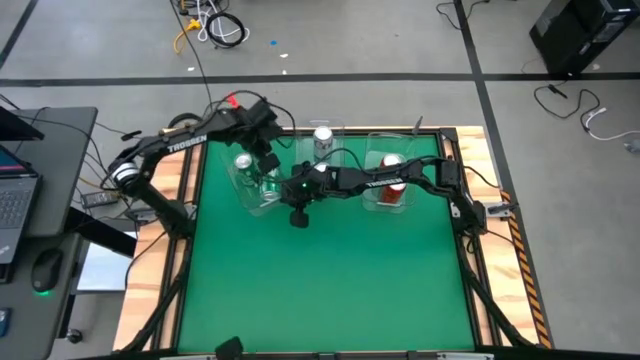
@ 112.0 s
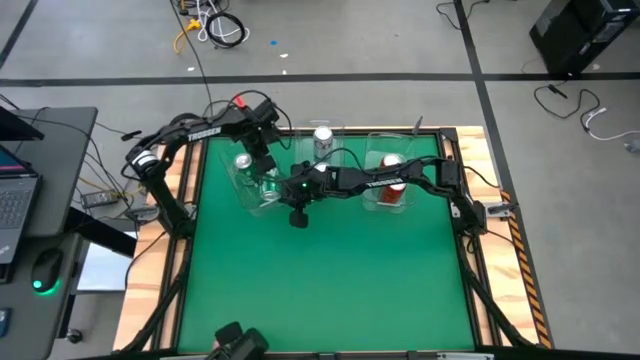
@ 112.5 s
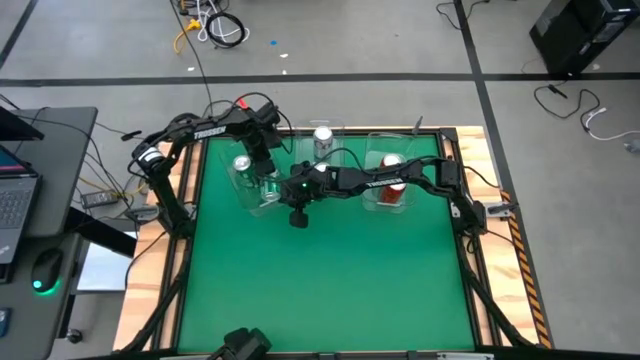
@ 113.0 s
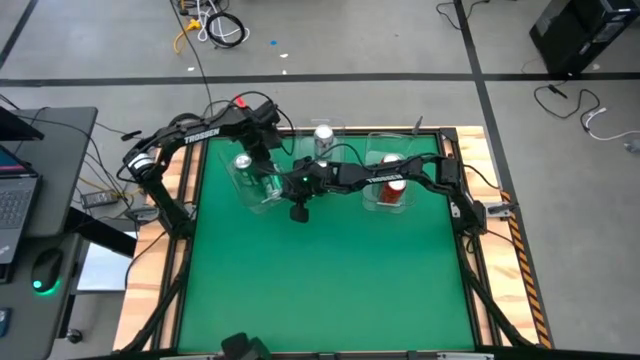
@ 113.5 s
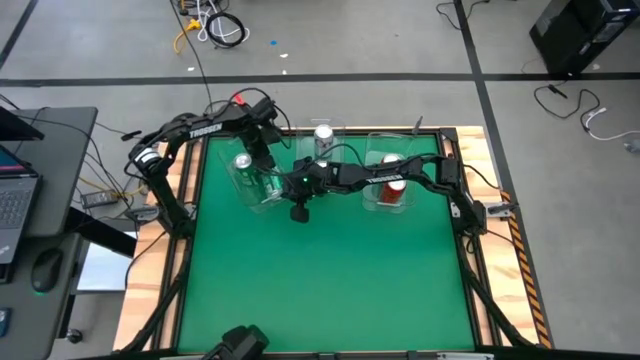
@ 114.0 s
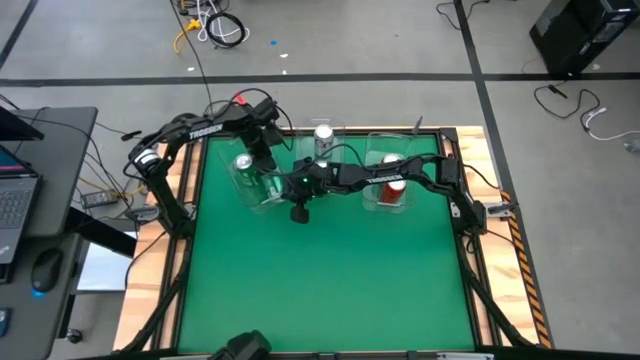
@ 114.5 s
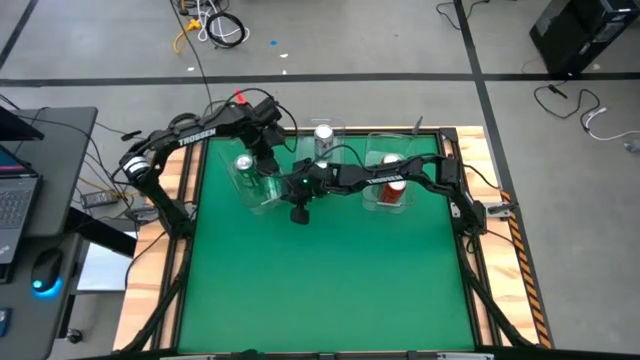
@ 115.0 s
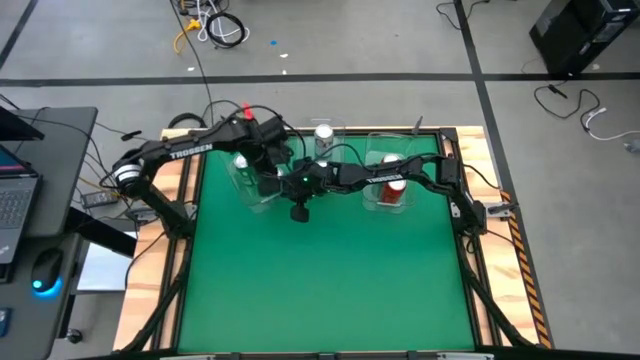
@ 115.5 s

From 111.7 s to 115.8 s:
Task: Sort soda cans
Adjust the right green soda can on the left transparent bin

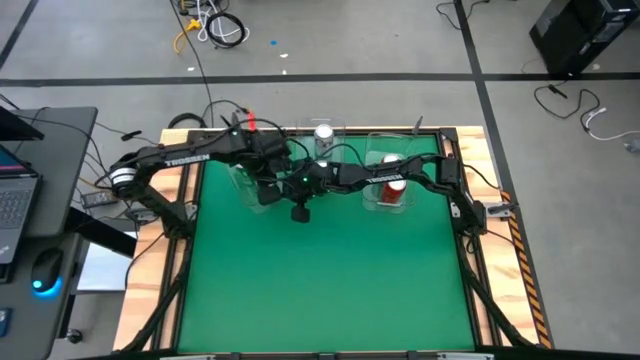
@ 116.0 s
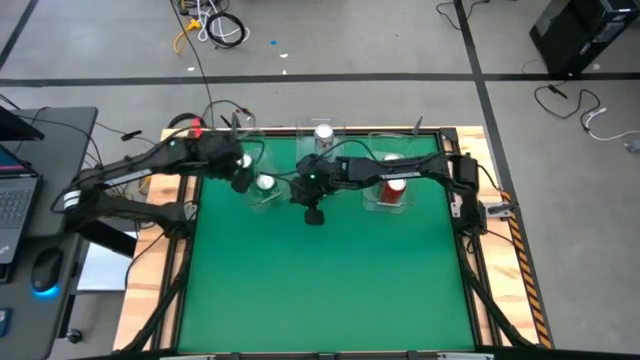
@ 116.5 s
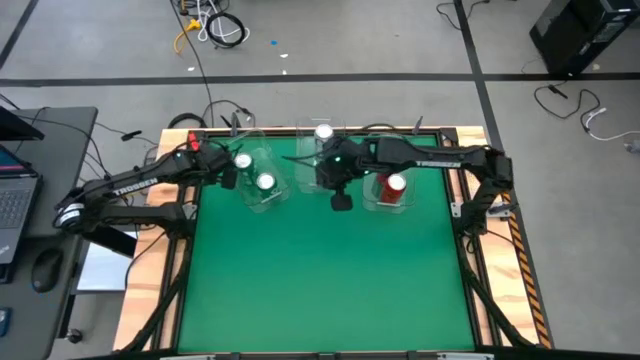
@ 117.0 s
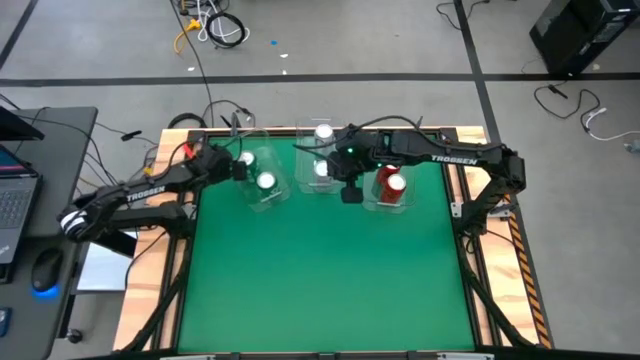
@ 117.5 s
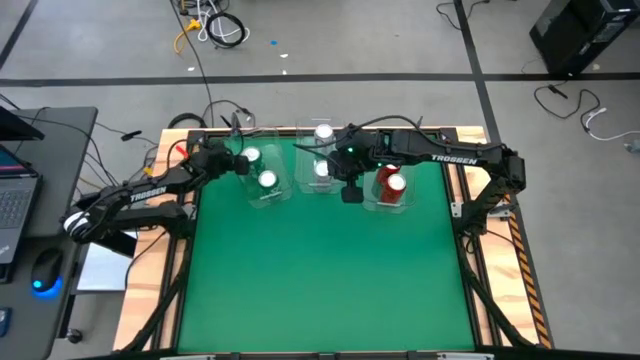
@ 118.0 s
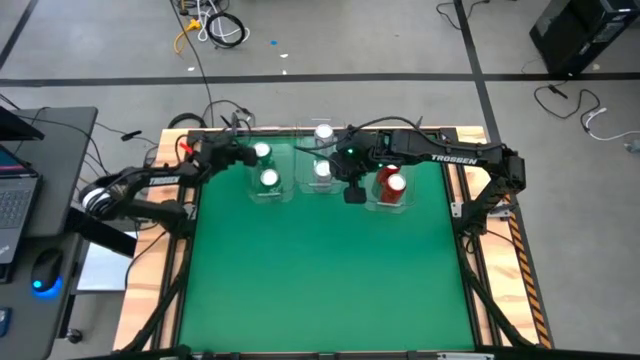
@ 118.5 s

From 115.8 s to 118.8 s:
Adjust the left transparent bin

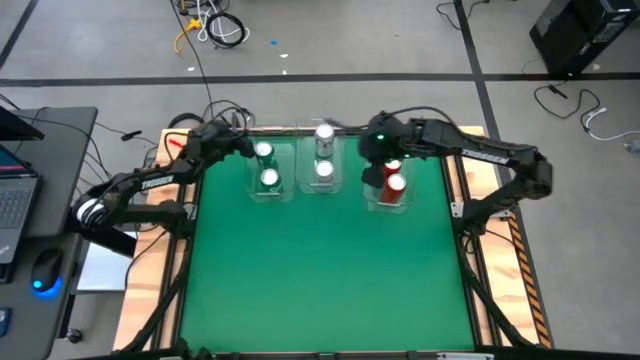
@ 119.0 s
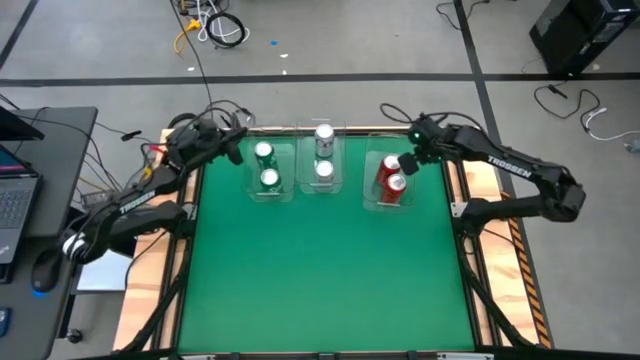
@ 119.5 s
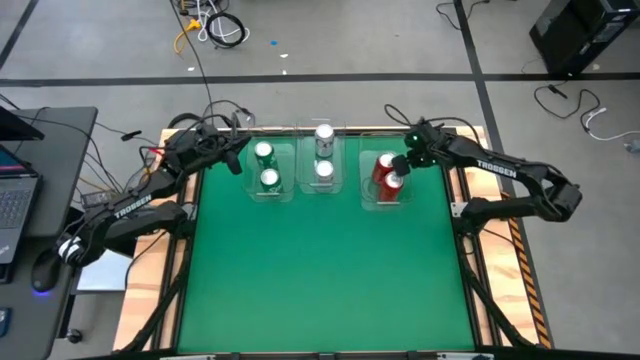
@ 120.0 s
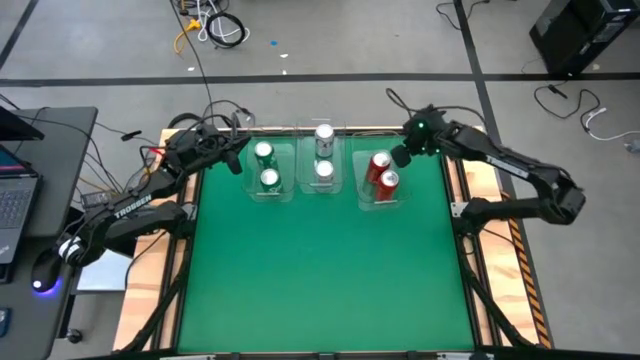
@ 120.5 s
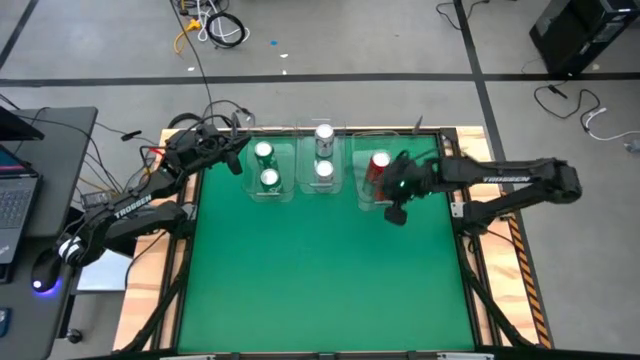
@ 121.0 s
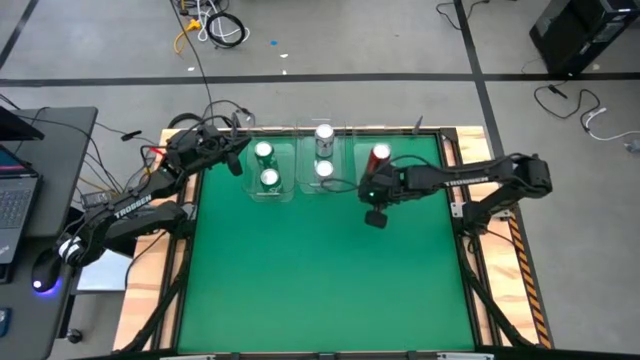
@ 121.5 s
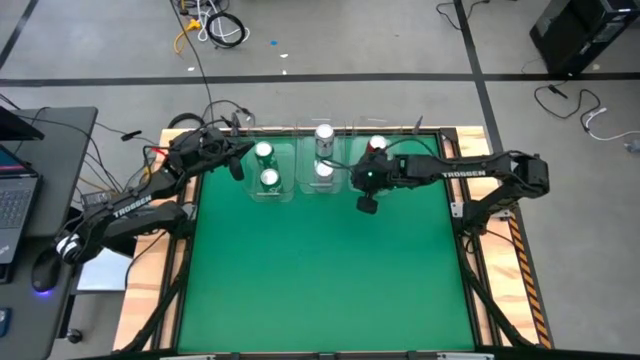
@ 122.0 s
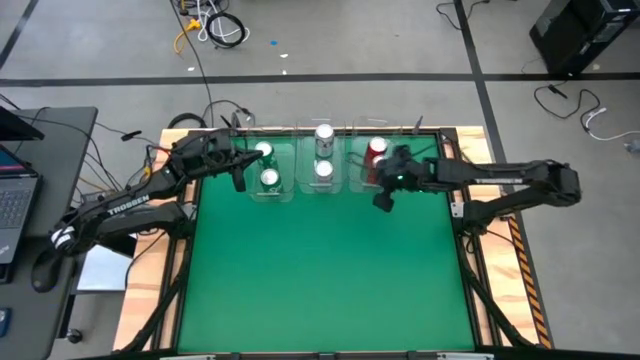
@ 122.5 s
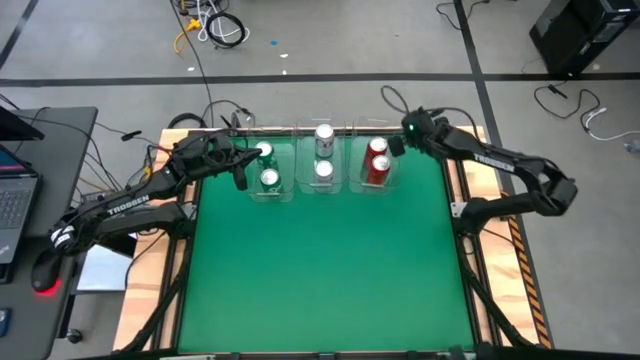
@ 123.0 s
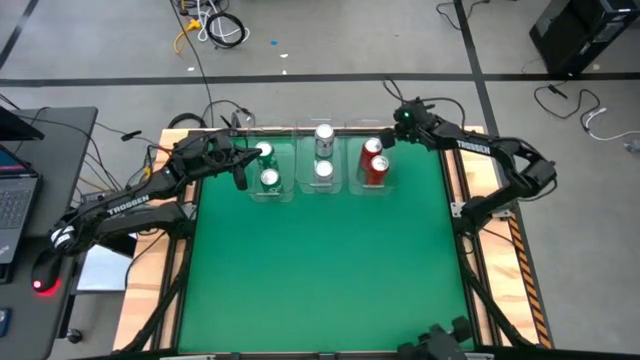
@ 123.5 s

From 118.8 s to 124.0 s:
Adjust the right transparent bin

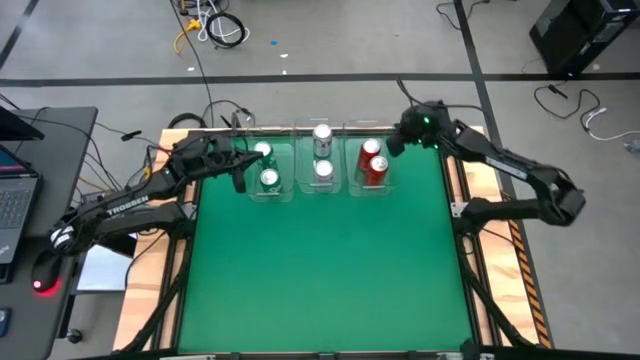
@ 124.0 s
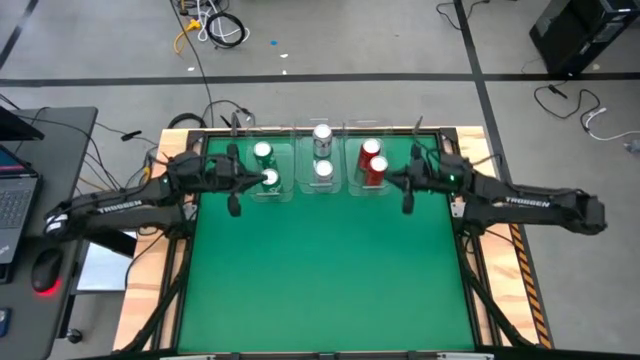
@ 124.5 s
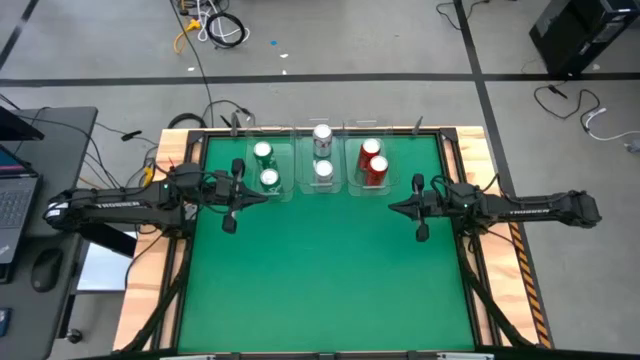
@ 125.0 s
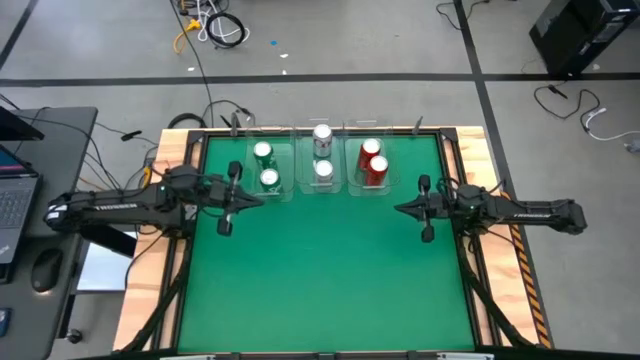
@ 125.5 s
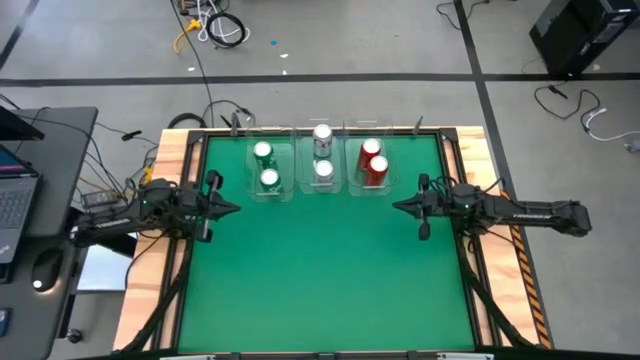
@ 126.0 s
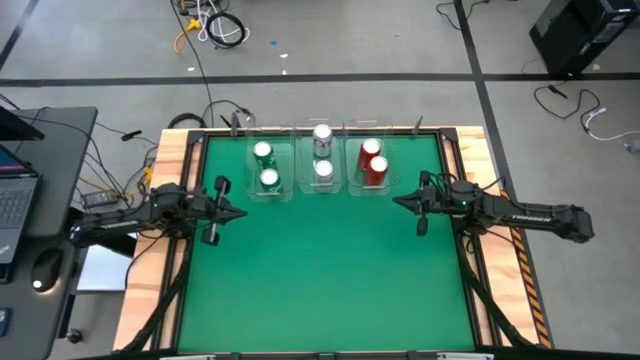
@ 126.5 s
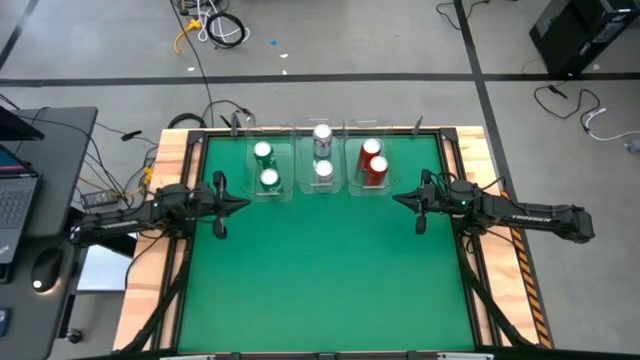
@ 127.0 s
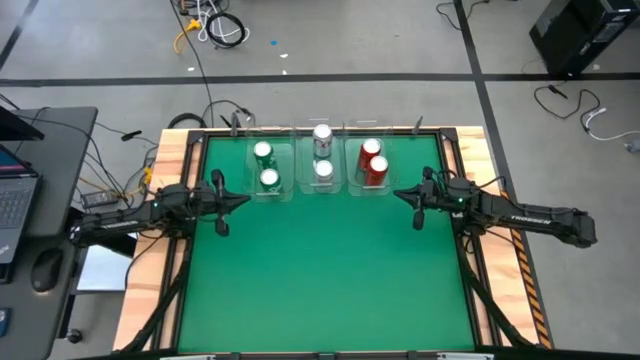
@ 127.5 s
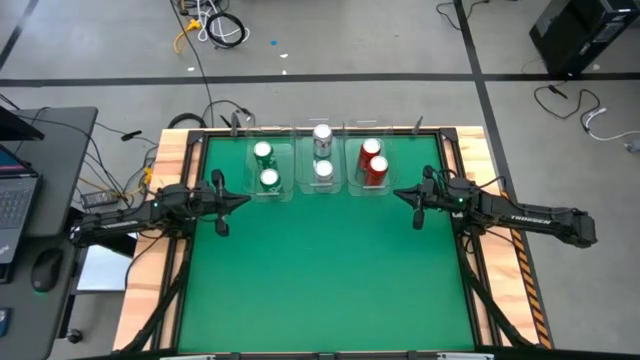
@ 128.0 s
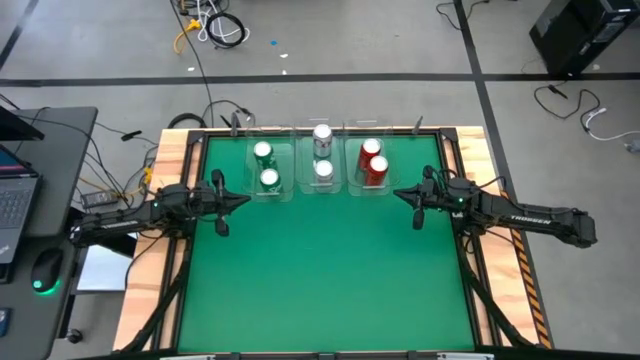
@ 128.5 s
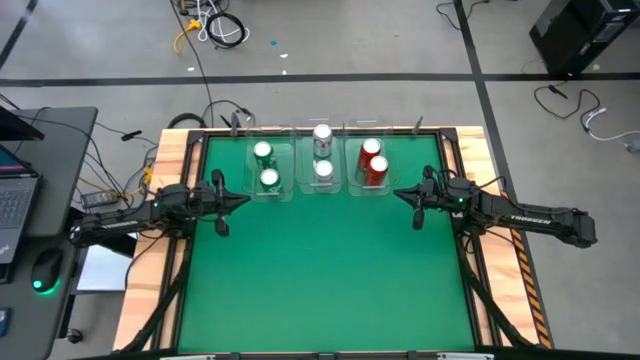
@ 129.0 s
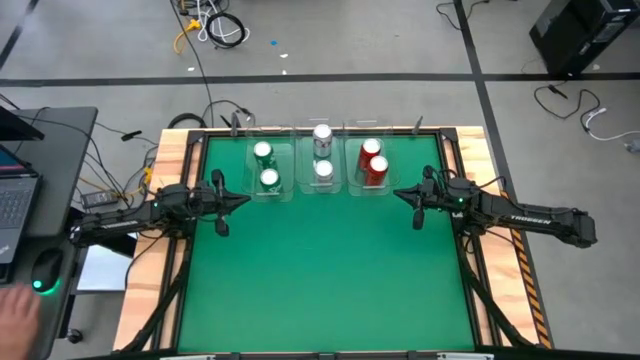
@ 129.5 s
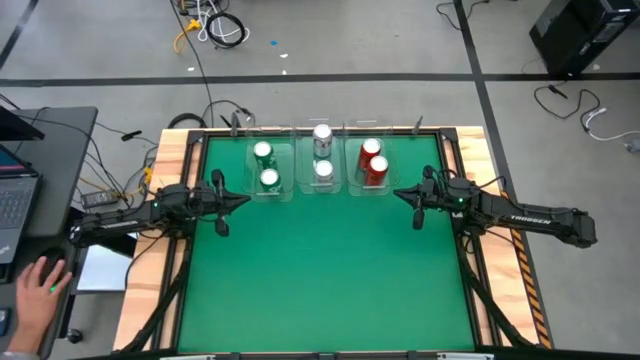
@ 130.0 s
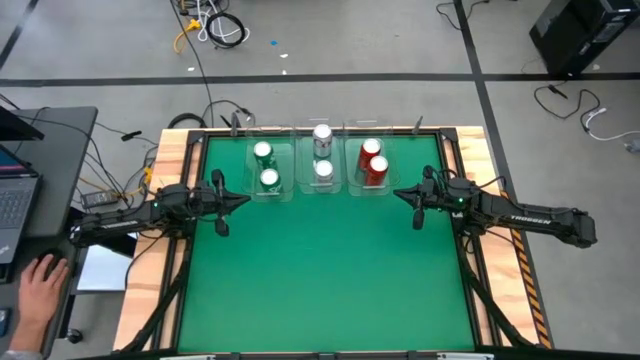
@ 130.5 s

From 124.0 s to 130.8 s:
Return to Home Position

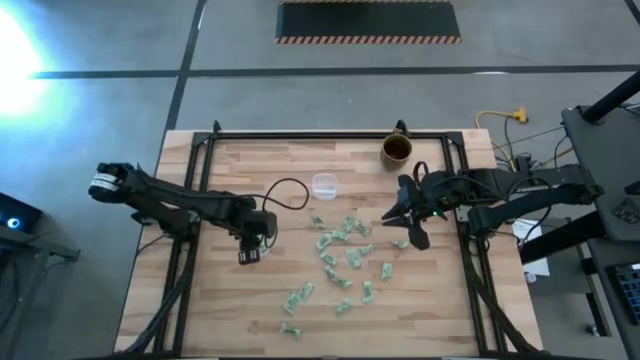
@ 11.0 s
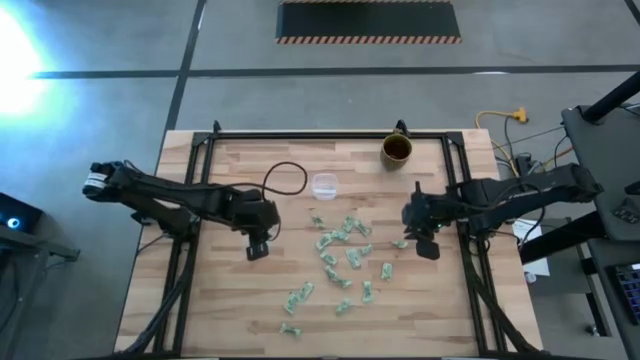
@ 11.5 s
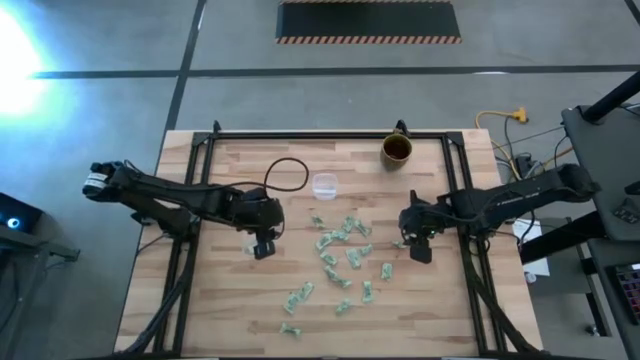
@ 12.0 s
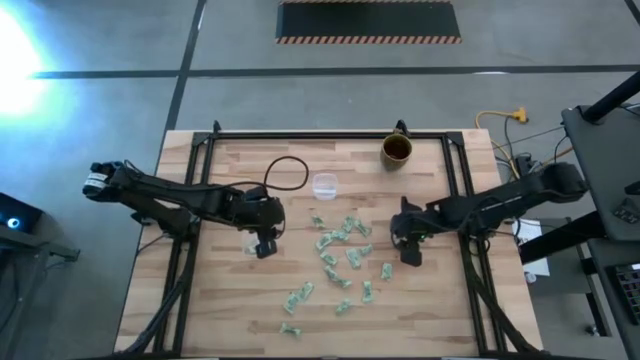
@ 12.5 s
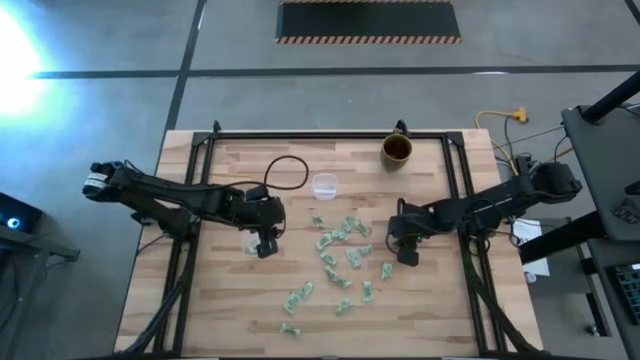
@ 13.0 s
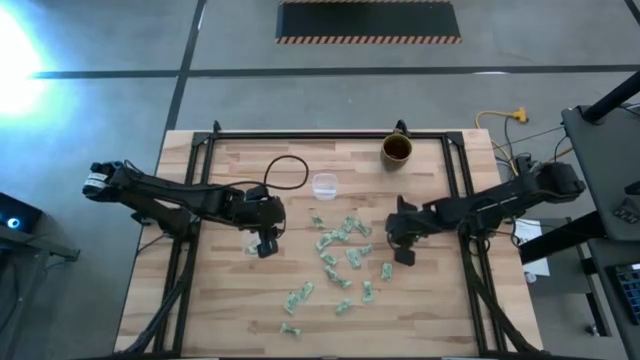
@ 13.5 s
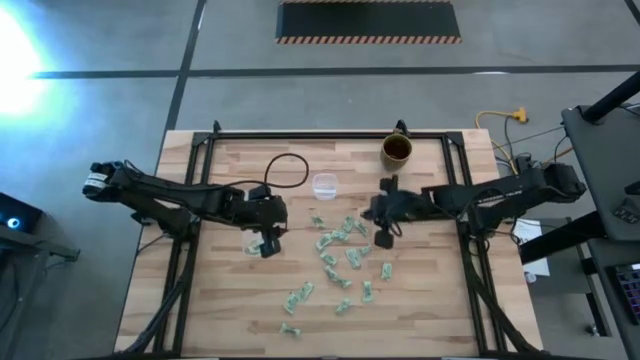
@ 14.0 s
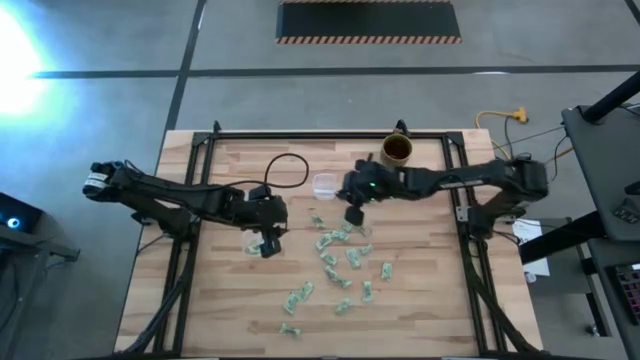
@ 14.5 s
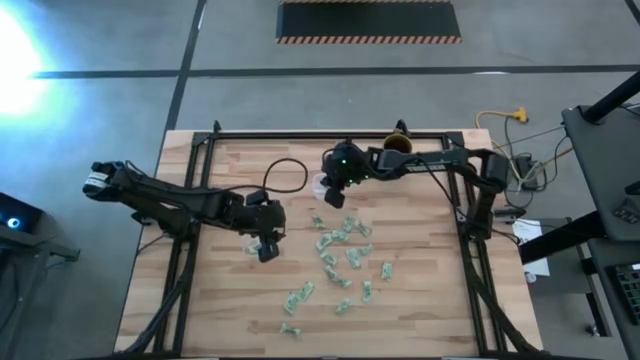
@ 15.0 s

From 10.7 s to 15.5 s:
Task: Pick and place Stevia / Truvia into bins
Put the stevia packet into the top transparent container
